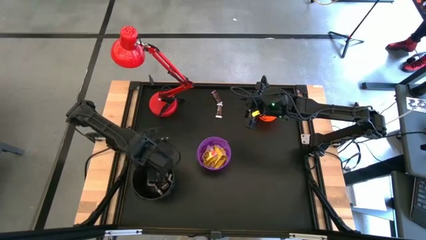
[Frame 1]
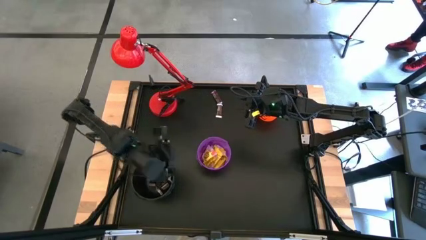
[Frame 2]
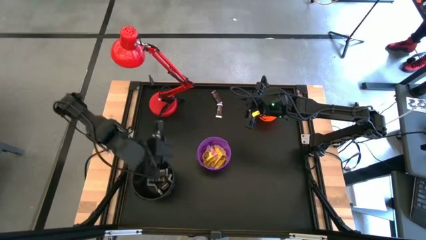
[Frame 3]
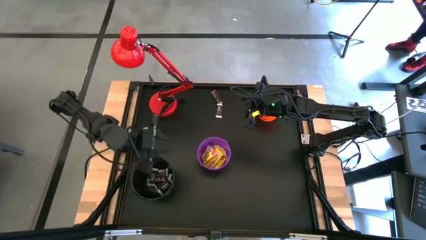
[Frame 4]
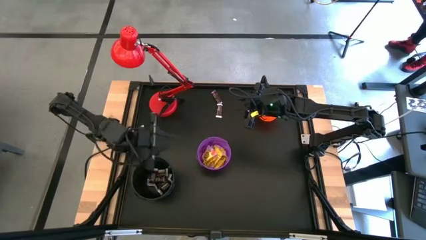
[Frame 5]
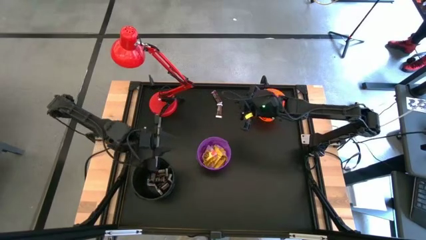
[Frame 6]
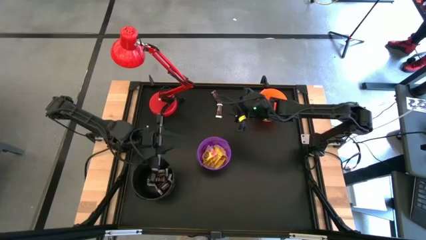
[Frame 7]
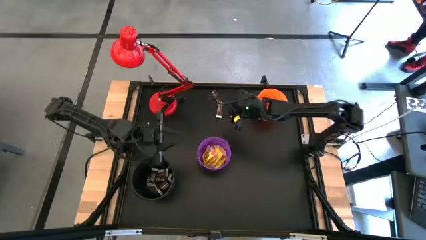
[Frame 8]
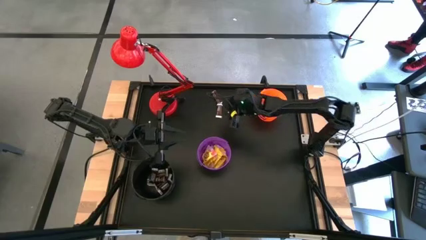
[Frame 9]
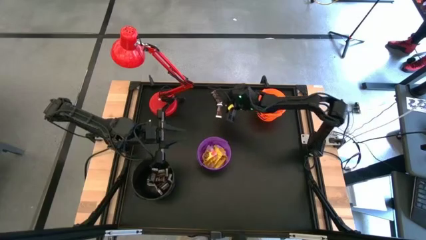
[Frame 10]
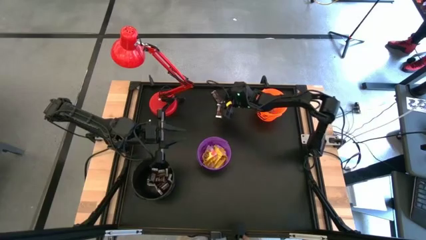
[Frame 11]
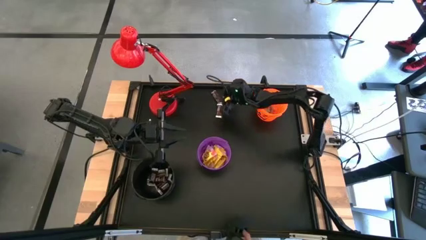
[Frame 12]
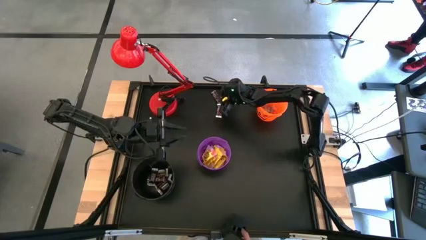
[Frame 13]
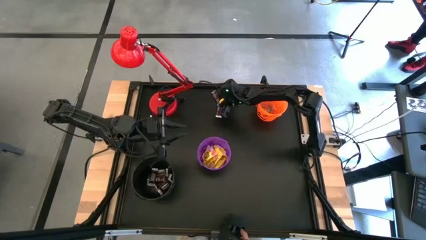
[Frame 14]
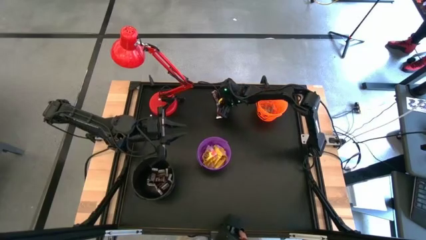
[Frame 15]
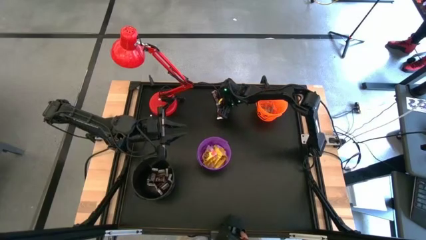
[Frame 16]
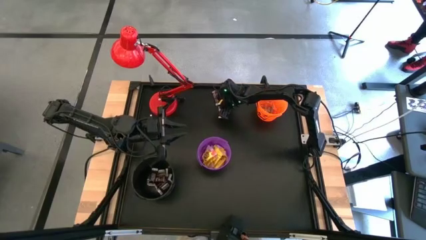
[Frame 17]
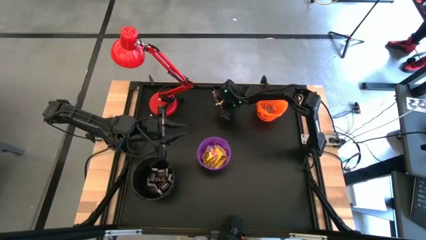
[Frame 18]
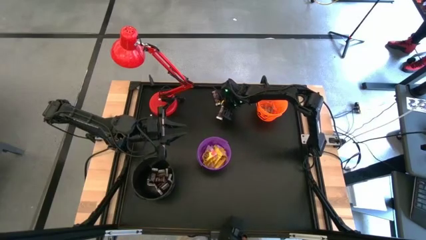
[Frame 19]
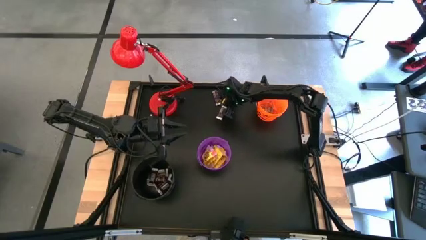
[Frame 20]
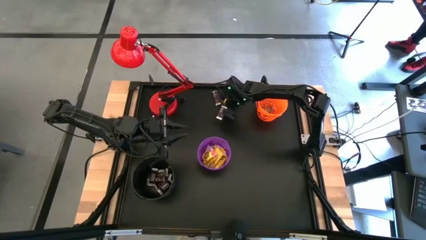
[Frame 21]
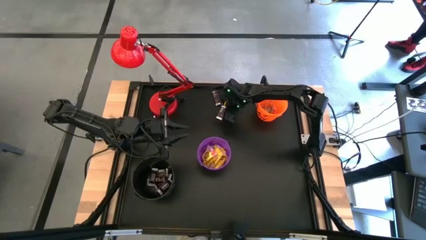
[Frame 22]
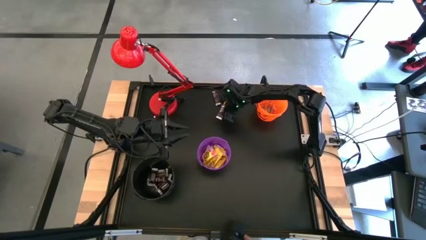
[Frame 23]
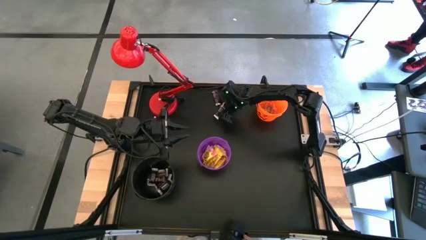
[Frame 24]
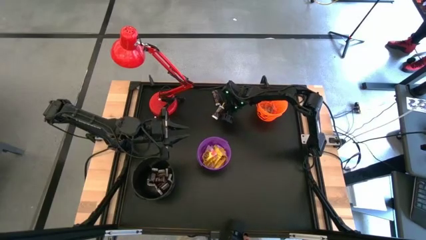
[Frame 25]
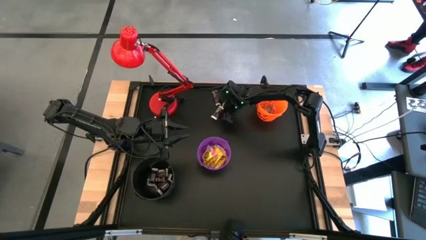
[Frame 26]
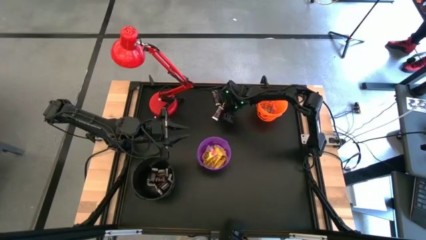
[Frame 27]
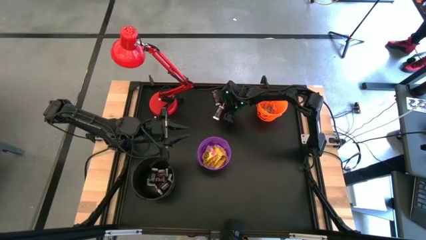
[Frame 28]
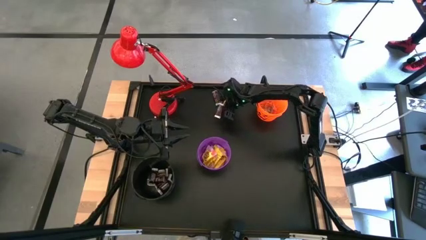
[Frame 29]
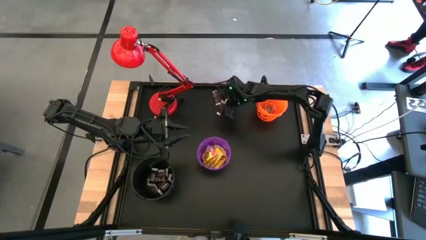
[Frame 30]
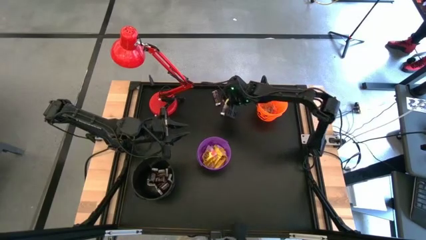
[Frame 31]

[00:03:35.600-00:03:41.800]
Task: Sort candy
Put the brown chocolate bar into the black bucket

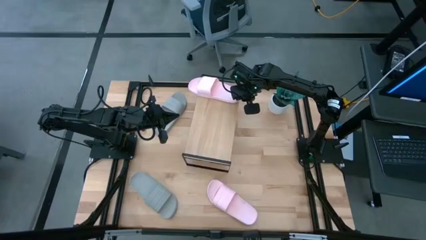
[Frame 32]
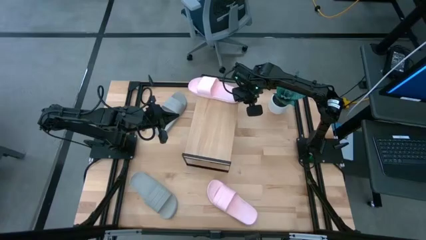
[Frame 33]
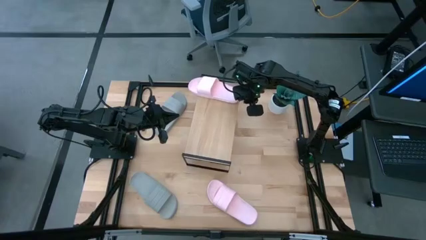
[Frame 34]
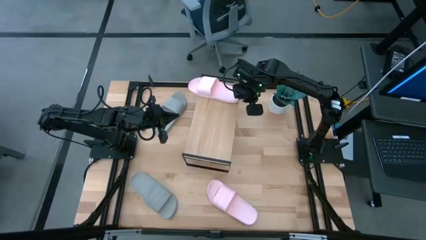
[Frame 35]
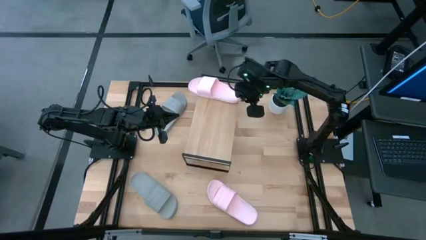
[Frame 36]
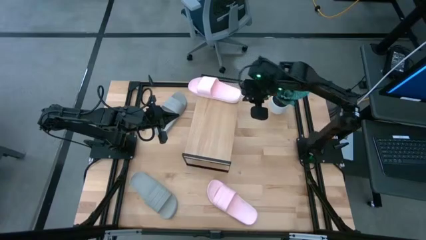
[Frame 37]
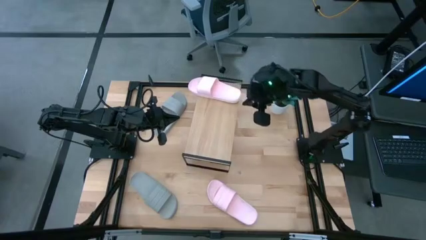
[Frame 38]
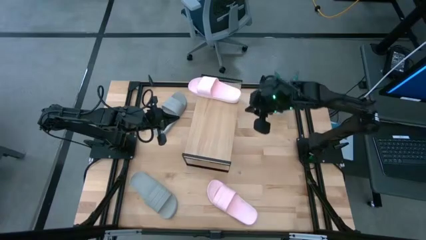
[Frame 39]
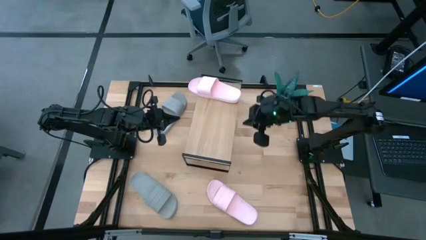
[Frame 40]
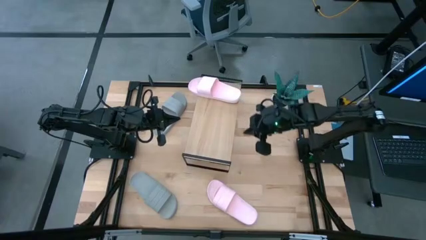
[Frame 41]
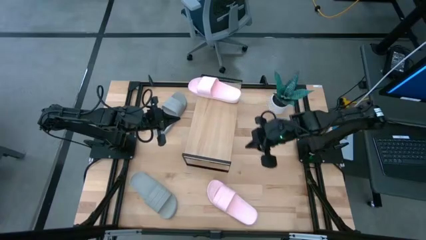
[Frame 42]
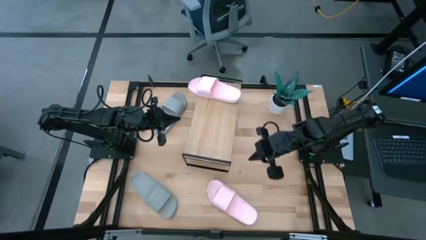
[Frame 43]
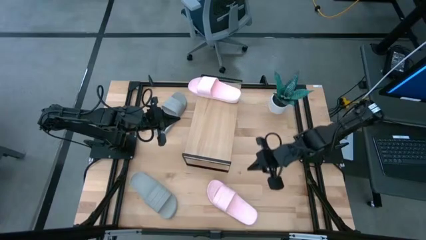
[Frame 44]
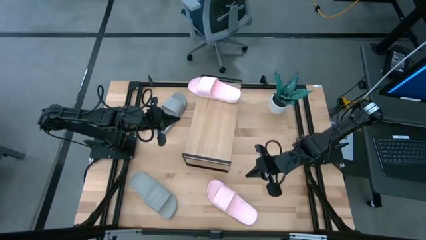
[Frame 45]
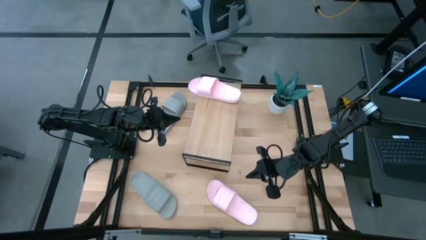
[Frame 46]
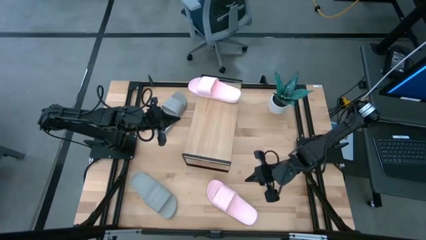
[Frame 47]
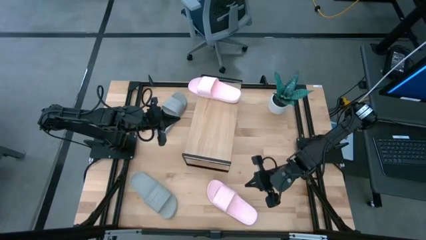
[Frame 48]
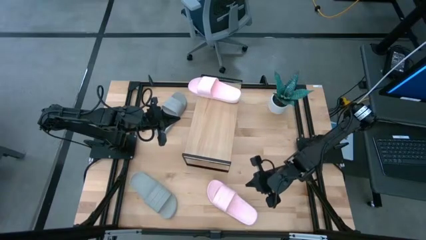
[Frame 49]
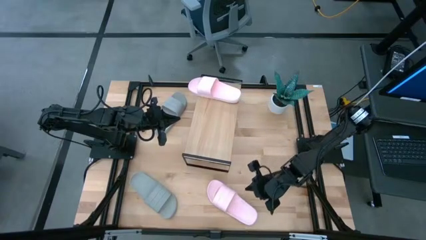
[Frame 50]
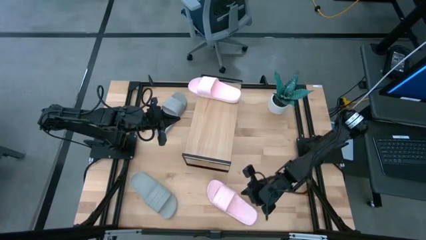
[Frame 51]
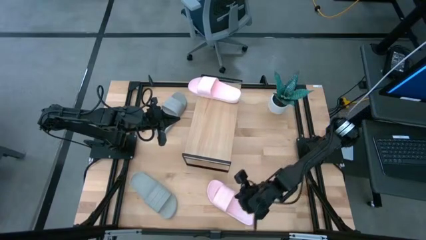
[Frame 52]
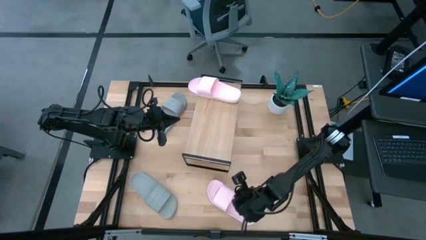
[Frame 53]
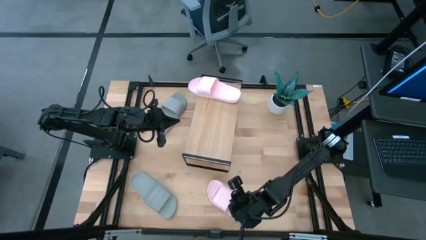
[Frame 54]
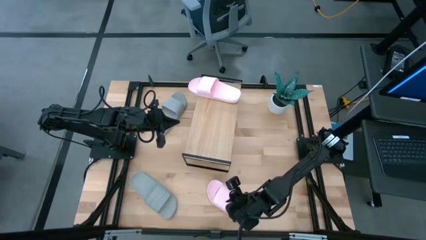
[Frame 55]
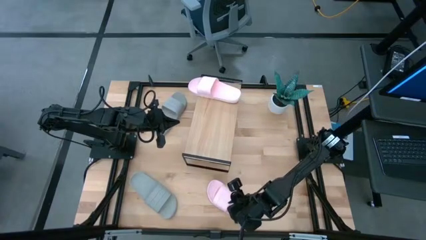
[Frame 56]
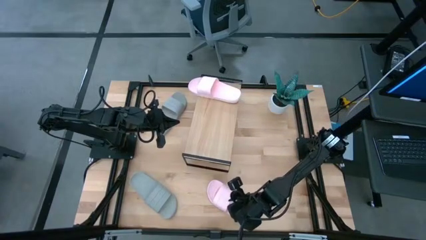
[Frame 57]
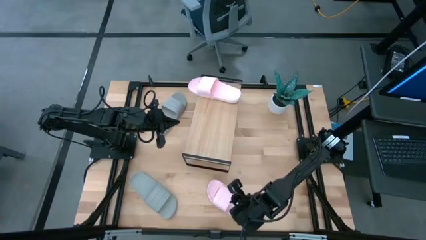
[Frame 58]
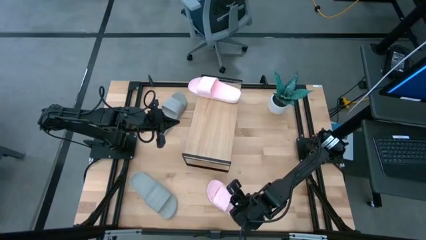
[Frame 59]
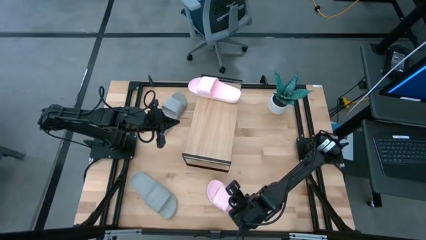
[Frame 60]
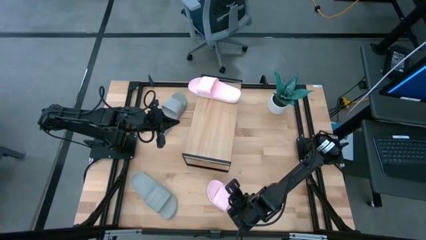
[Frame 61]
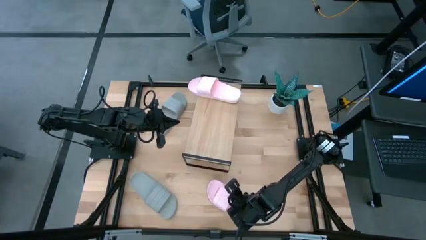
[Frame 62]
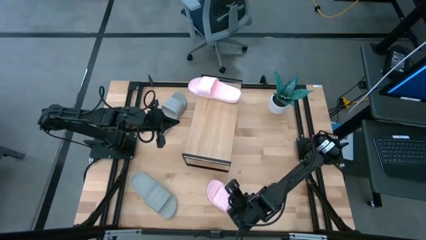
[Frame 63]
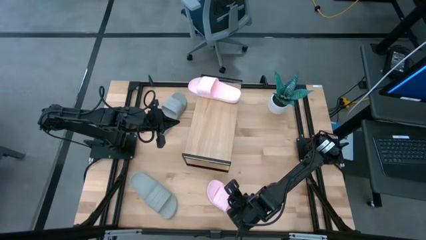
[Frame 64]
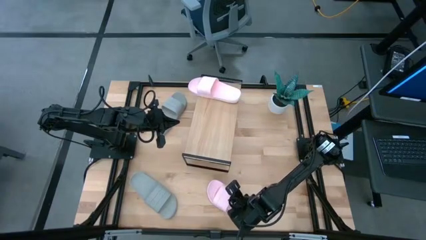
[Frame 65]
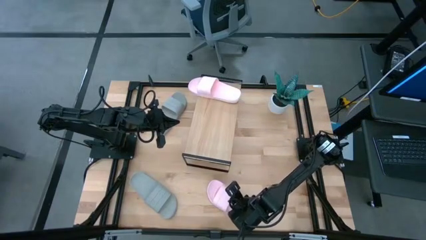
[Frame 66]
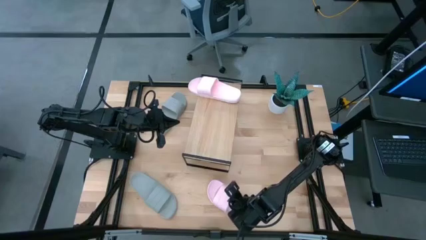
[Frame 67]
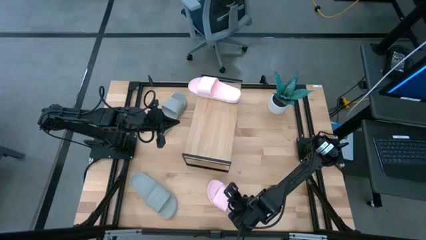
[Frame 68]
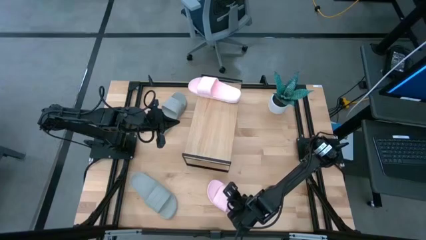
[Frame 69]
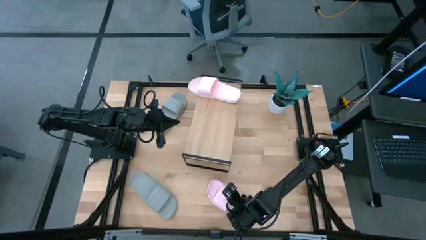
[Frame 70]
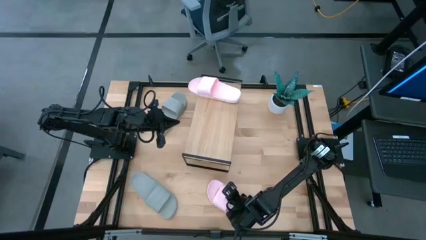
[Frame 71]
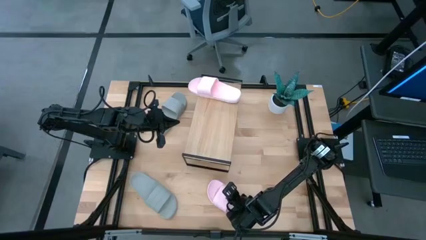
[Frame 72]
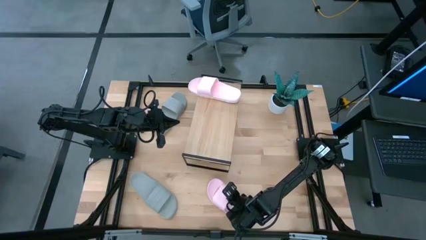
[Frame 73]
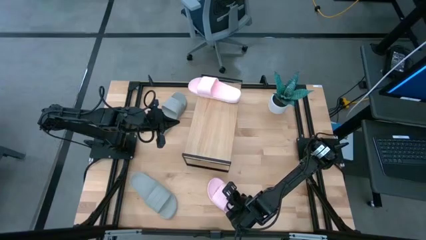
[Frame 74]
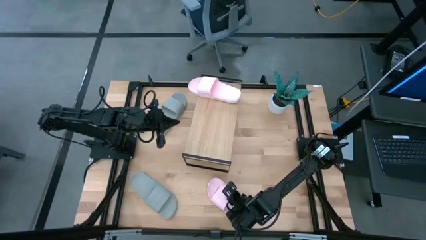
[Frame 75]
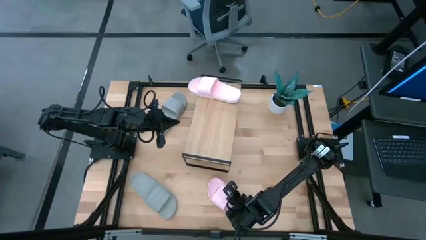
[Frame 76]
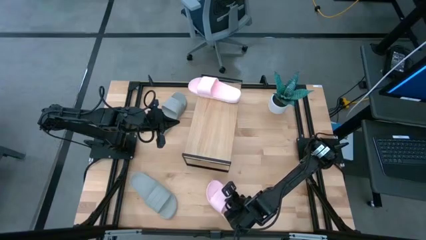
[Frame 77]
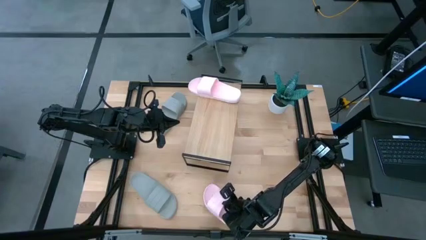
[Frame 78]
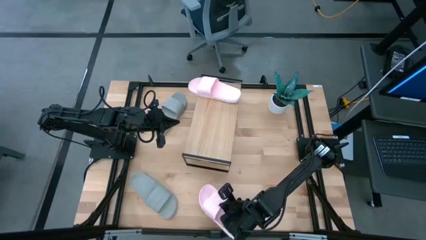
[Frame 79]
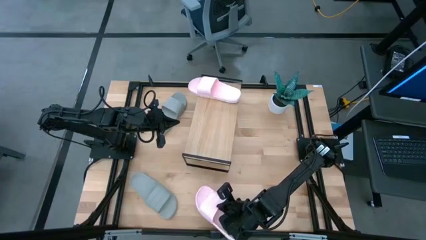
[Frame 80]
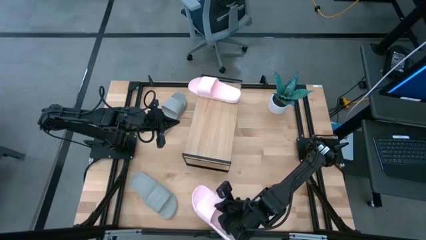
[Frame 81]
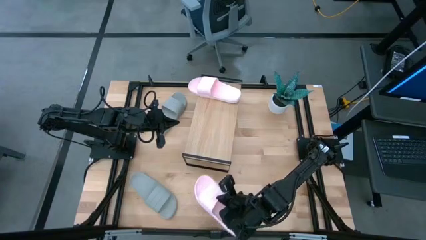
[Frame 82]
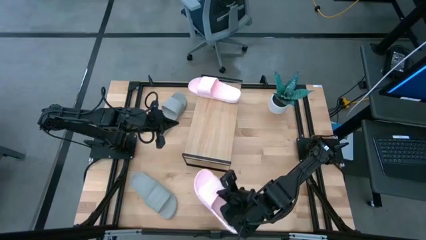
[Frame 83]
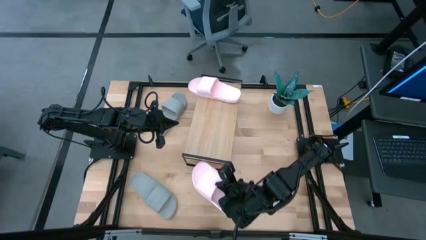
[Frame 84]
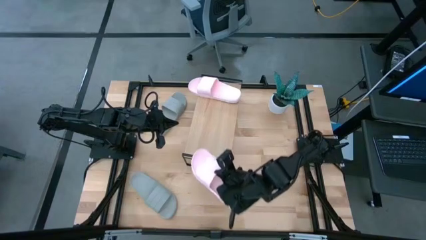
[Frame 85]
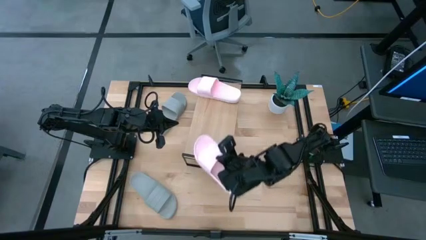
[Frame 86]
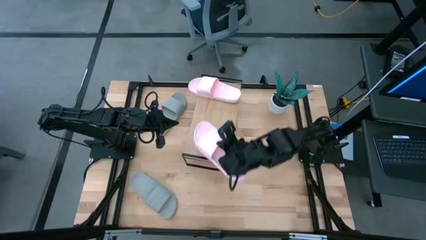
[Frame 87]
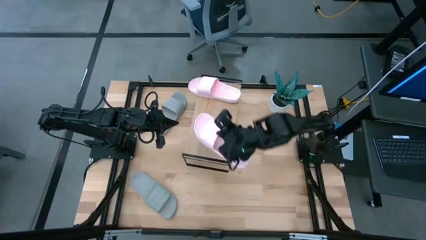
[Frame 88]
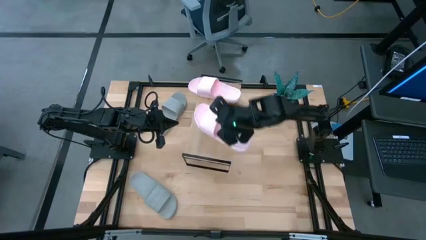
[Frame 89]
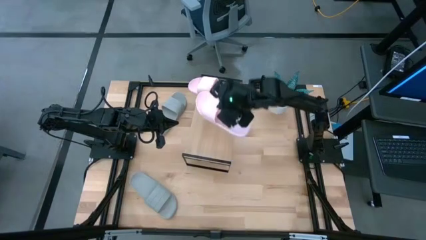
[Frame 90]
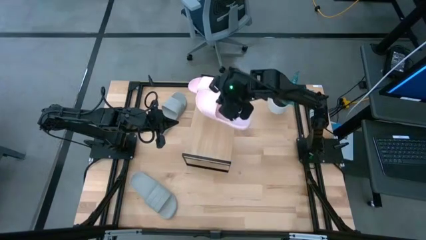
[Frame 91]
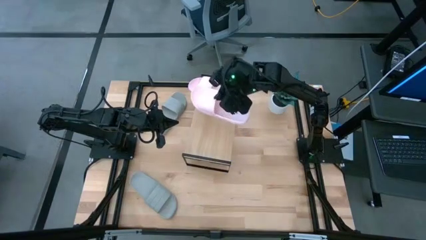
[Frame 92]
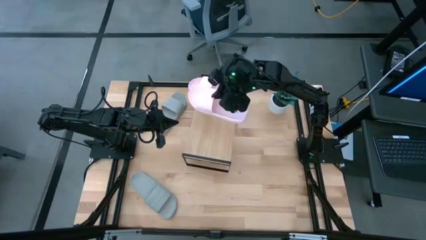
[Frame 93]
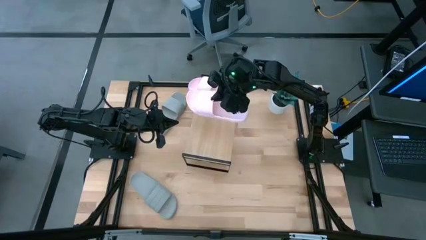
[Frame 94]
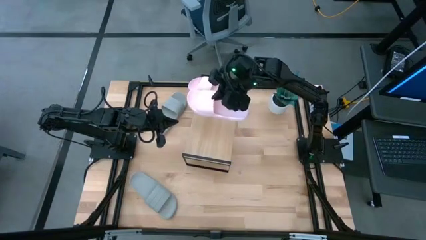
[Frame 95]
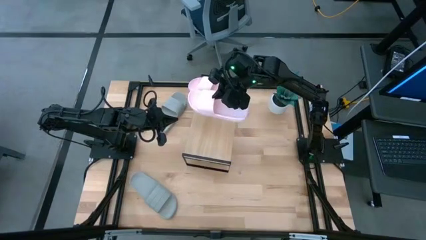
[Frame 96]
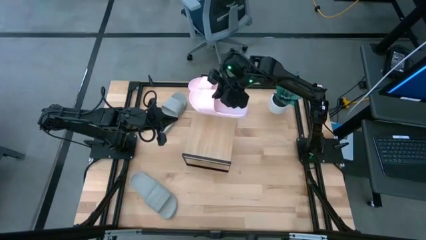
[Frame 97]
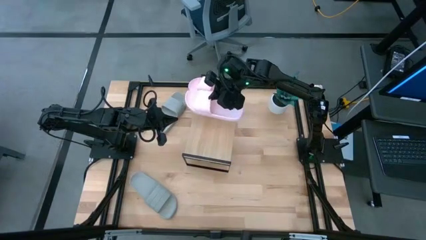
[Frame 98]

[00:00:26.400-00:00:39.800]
Task: Pick and place slides into the shelf
Put the pink slipper on the shelf
